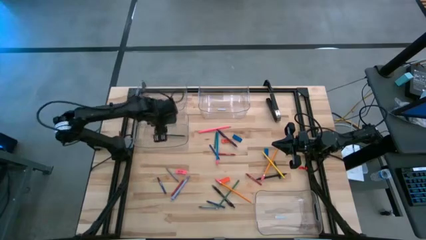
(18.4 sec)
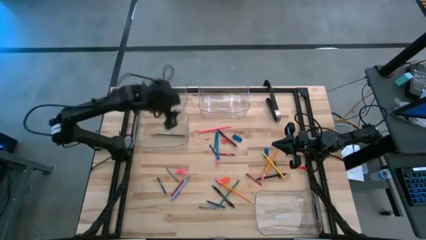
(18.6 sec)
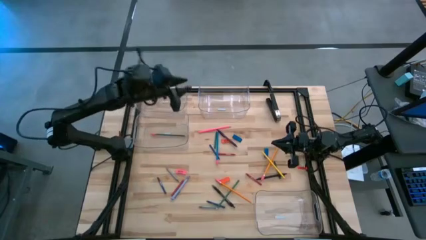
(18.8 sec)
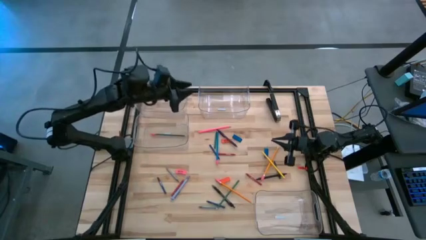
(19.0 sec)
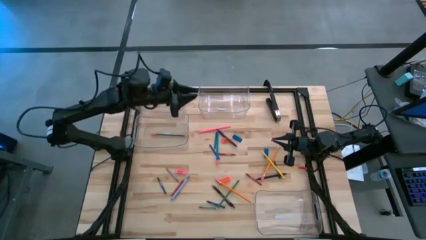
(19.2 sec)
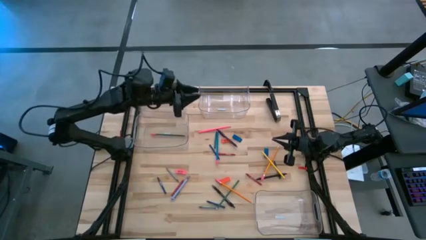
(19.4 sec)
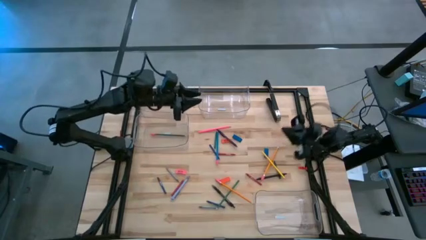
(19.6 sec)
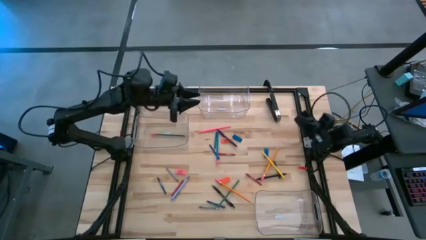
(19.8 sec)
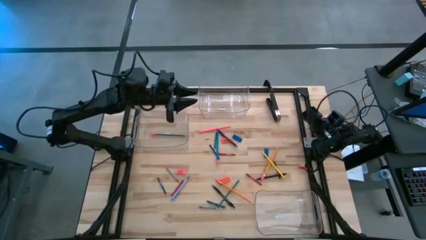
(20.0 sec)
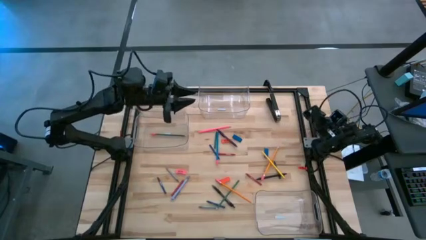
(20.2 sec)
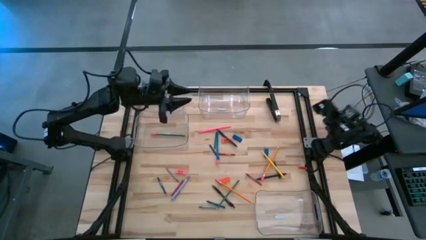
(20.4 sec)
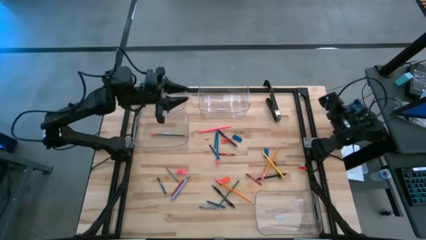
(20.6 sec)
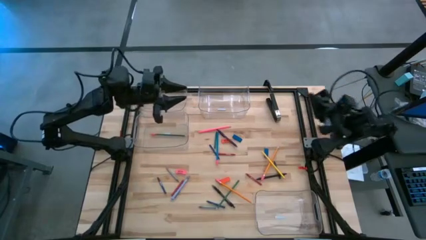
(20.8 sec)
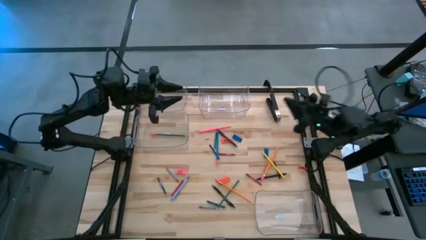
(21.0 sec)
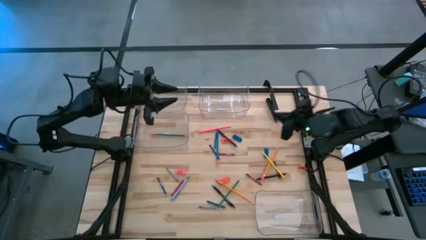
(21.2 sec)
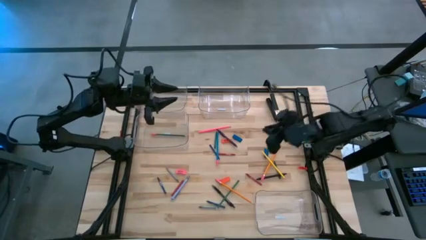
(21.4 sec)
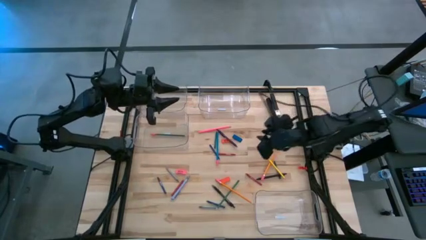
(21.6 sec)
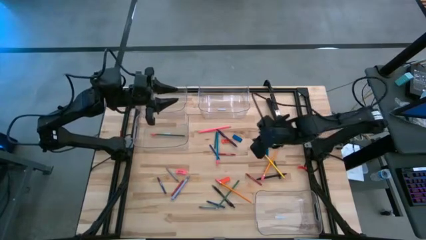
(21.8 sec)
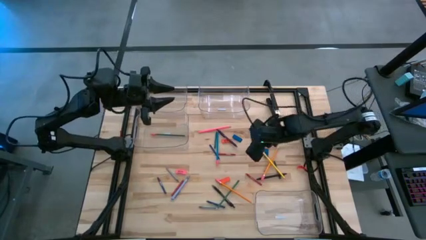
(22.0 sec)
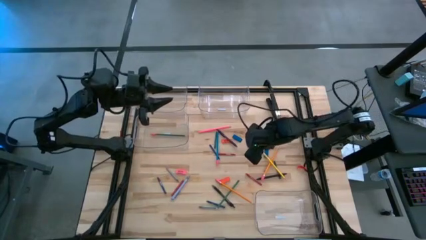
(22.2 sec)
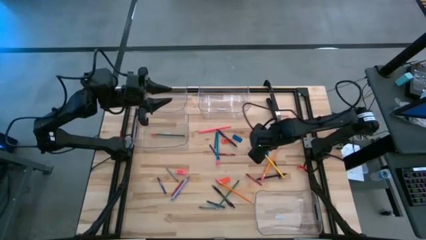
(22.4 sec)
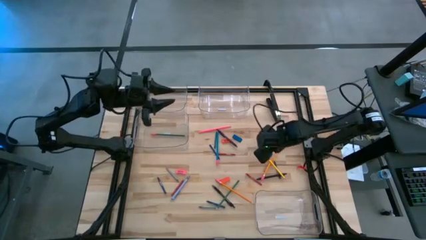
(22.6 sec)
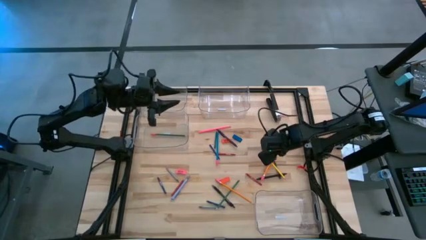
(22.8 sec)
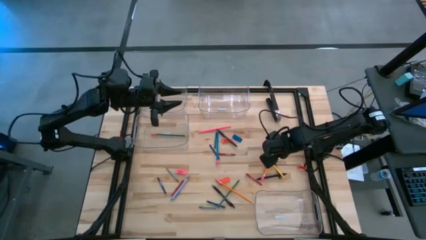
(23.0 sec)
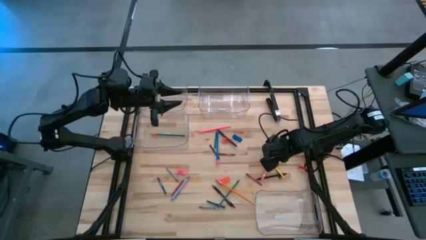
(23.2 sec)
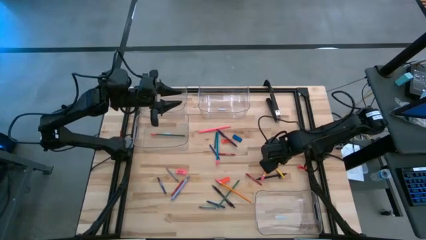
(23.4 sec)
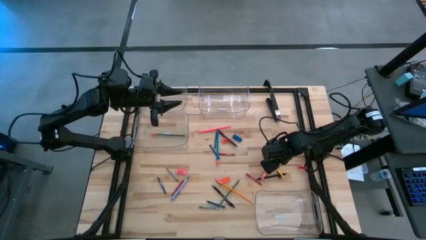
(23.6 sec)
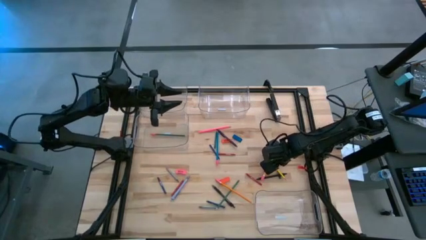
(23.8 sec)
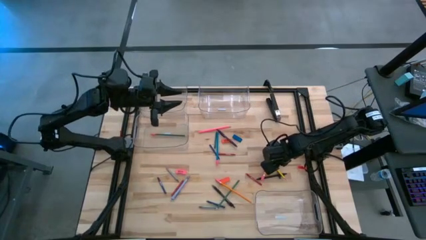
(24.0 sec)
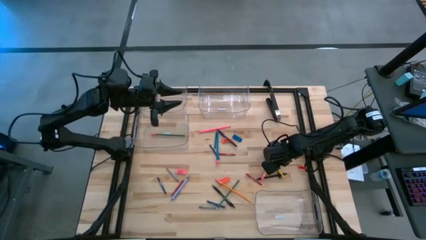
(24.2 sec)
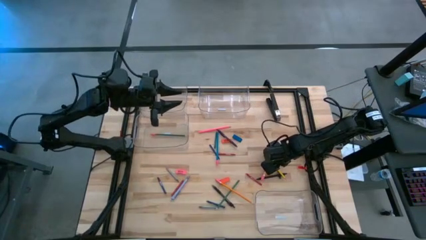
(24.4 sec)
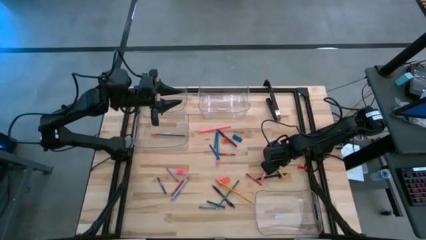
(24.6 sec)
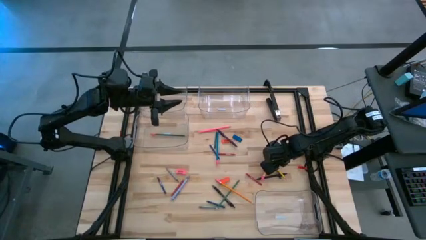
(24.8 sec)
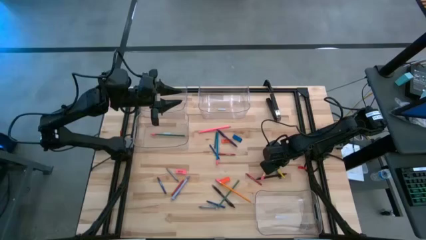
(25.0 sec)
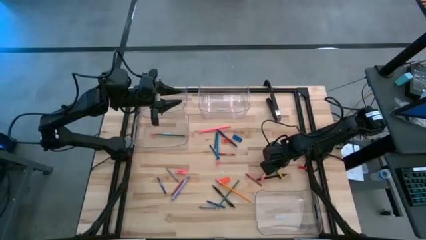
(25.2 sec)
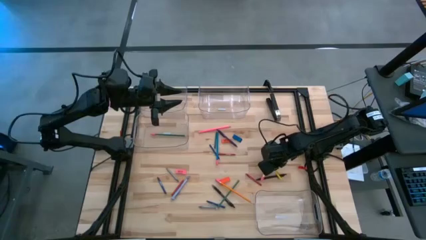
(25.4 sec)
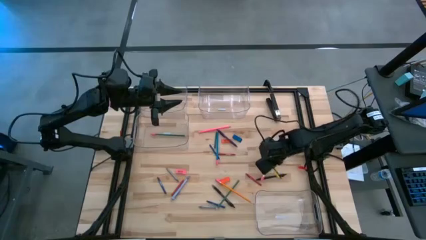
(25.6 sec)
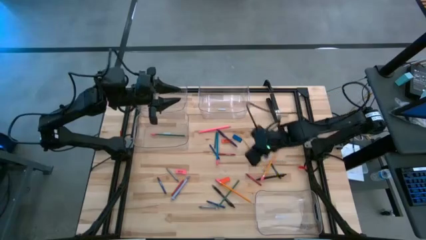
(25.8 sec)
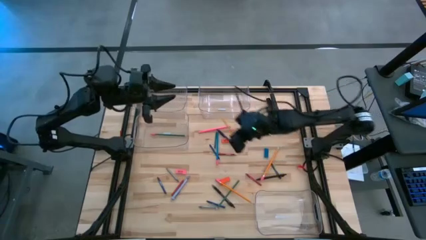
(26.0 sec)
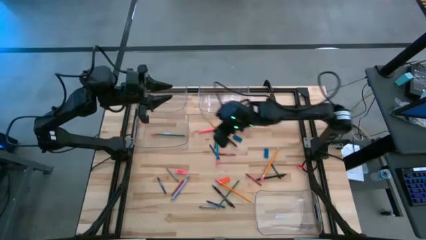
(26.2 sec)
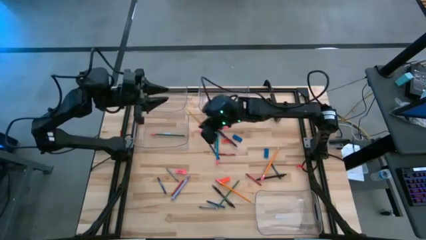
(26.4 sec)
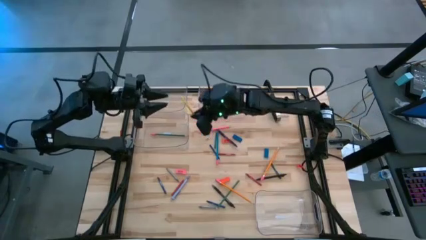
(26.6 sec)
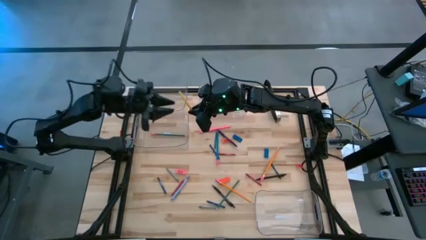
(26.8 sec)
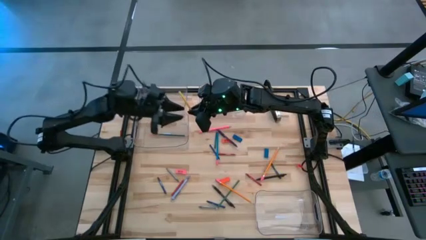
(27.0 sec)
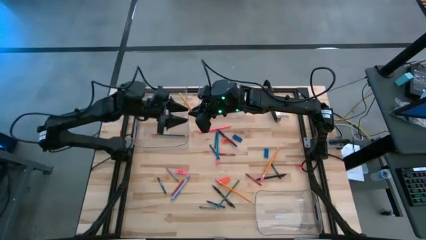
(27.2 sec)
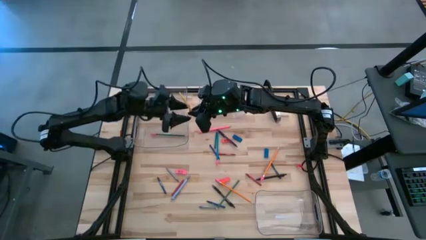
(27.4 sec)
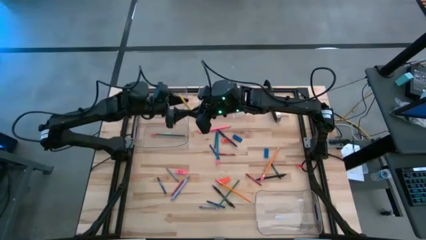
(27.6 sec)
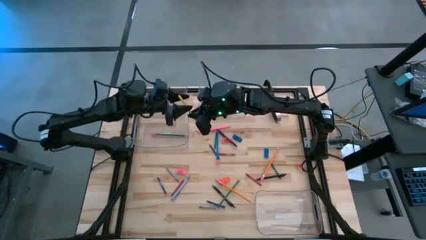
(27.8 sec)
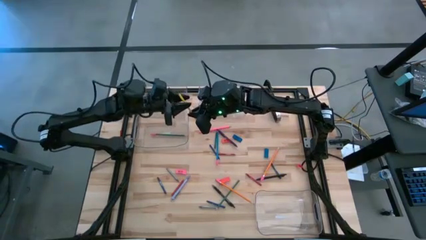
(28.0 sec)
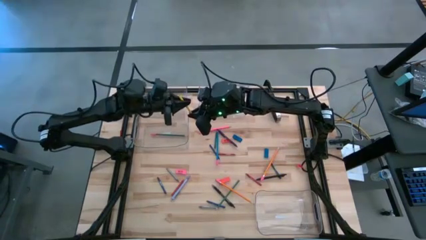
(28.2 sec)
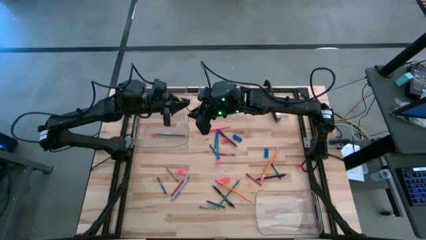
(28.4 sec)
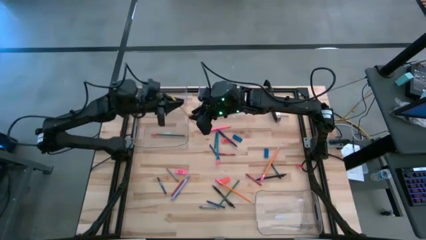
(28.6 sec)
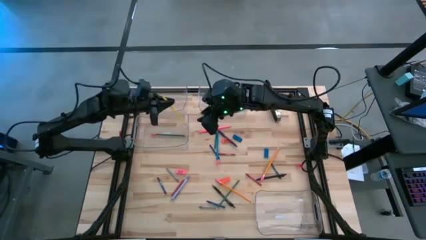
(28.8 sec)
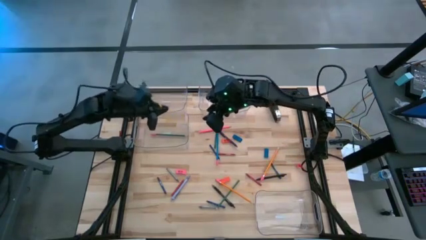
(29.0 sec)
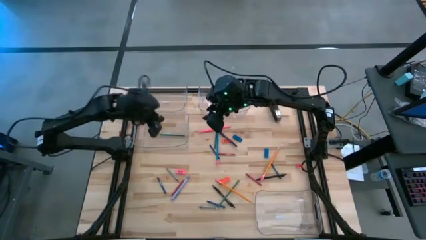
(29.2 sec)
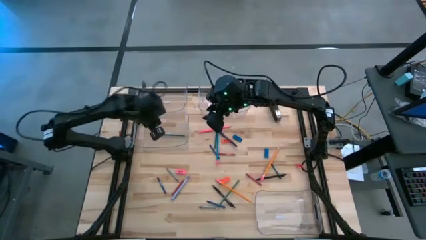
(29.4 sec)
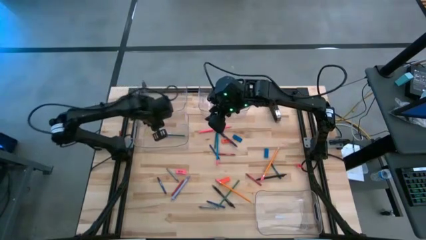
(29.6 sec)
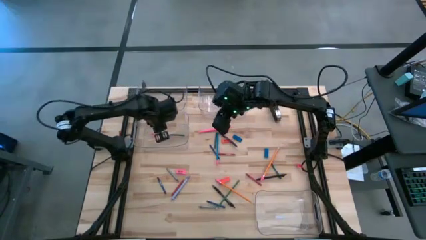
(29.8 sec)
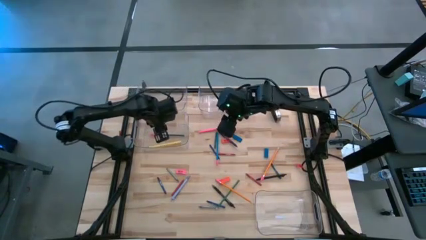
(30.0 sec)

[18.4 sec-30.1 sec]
Task: Sort crayons/erasers/pens/pencils in bins
Put the yellow pencil into the bottom left transparent bin

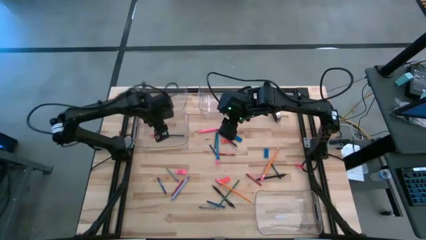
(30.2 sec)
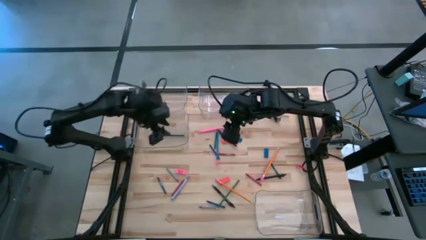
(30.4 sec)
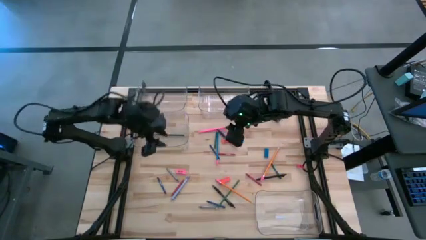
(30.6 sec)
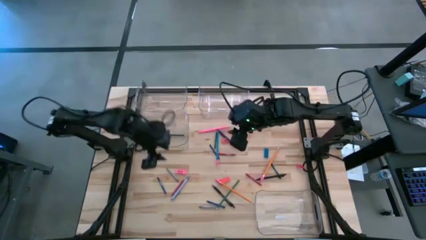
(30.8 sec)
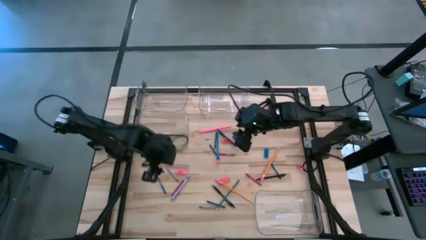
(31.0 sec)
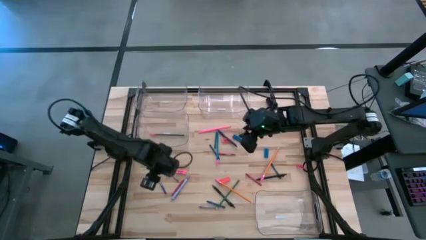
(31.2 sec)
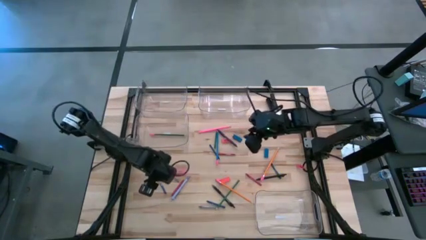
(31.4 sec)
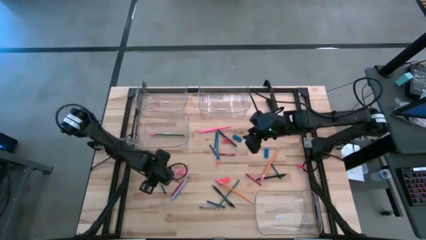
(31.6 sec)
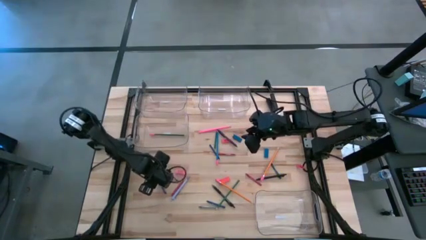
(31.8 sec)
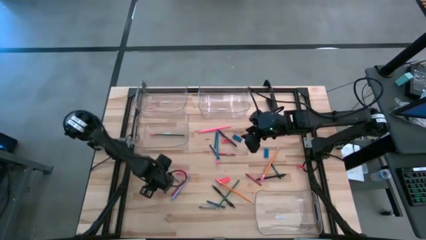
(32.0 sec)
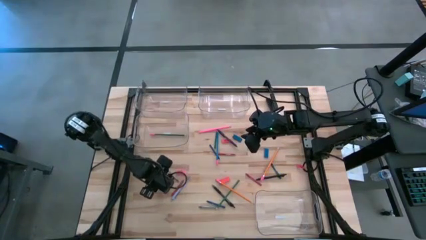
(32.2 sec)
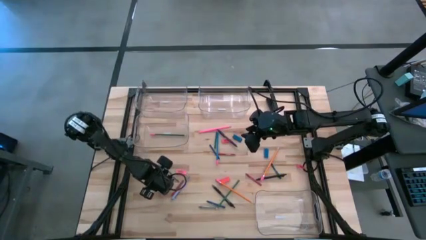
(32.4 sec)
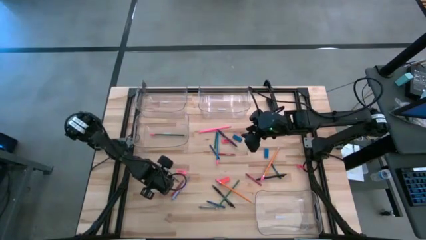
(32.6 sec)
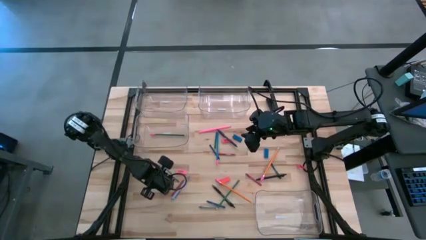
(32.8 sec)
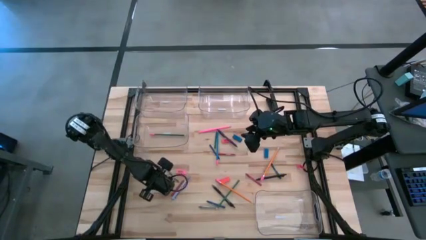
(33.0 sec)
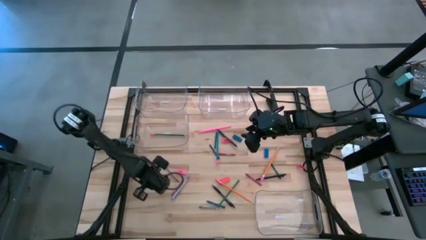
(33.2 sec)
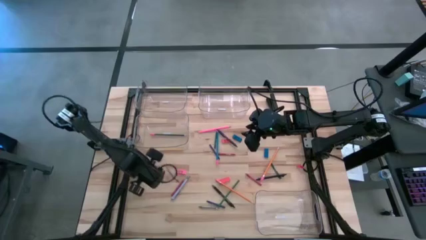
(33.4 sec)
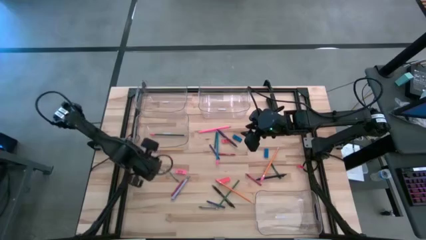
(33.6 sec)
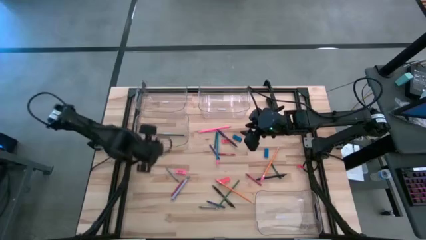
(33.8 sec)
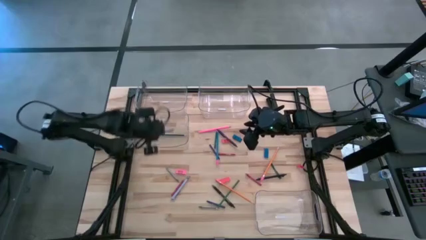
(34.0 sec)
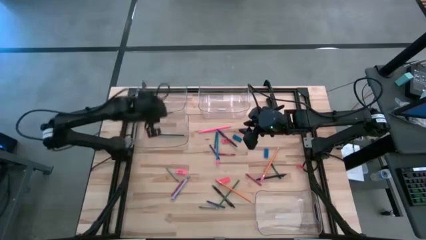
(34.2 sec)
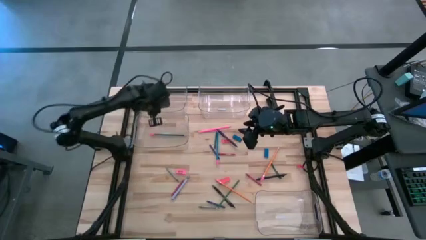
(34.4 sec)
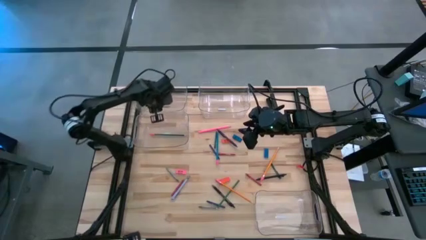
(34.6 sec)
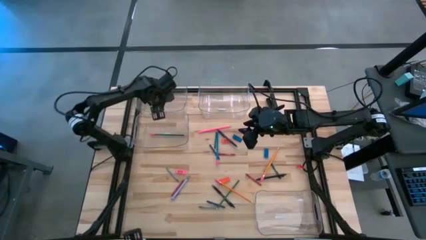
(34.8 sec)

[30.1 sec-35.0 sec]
Put the blue crayon into the top left transparent bin
